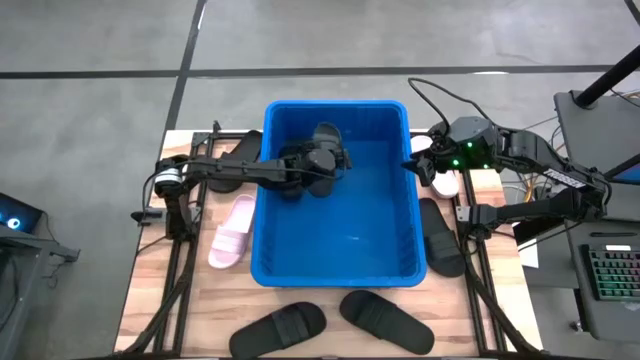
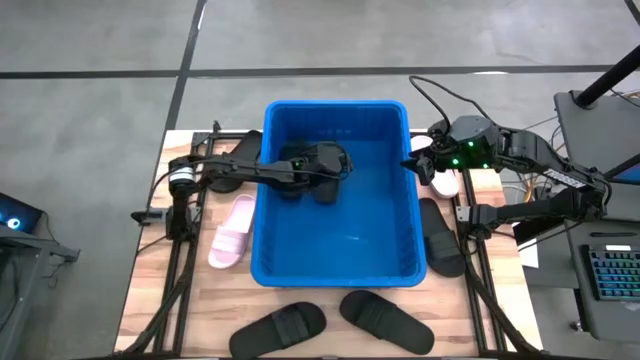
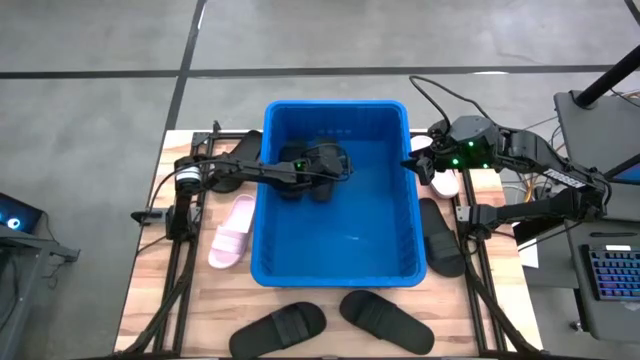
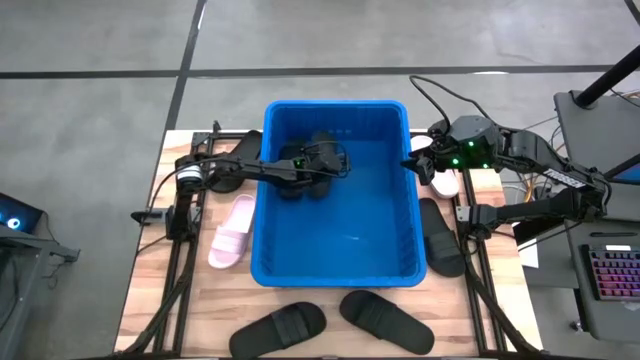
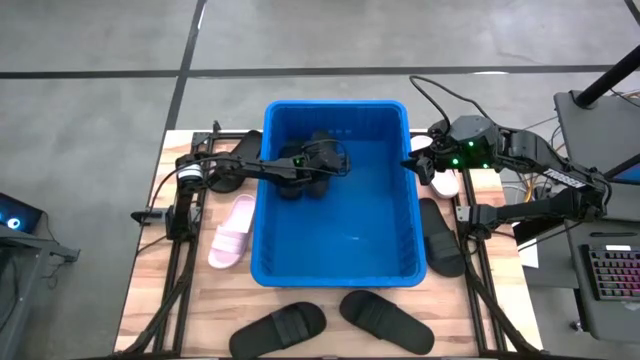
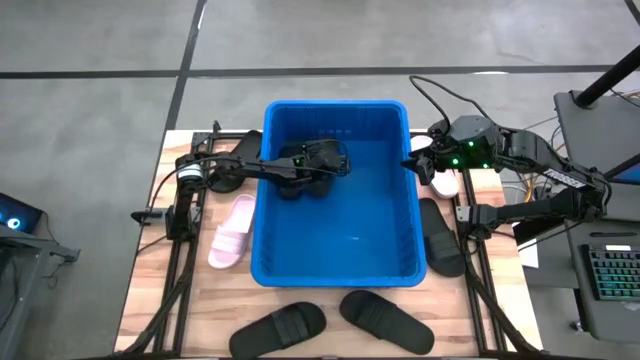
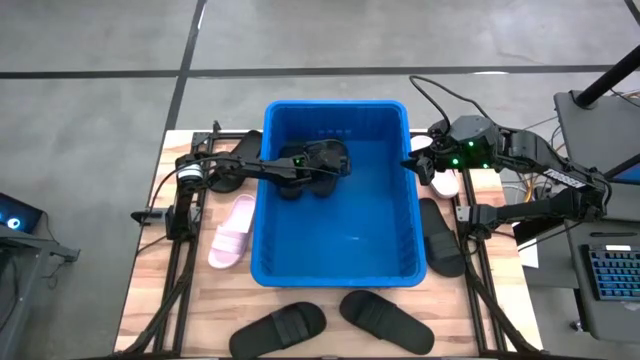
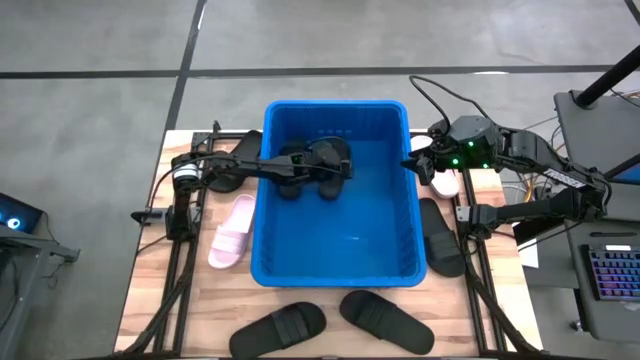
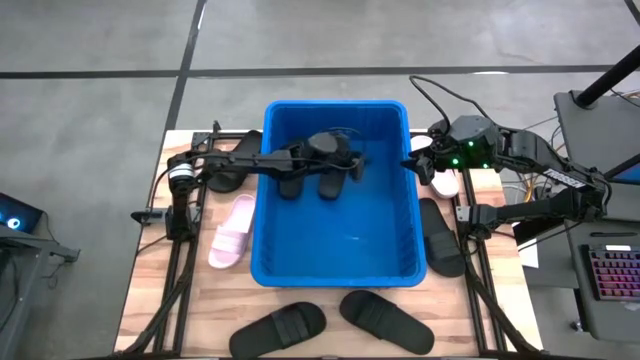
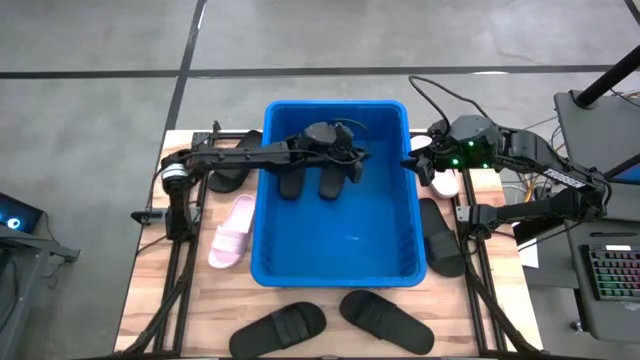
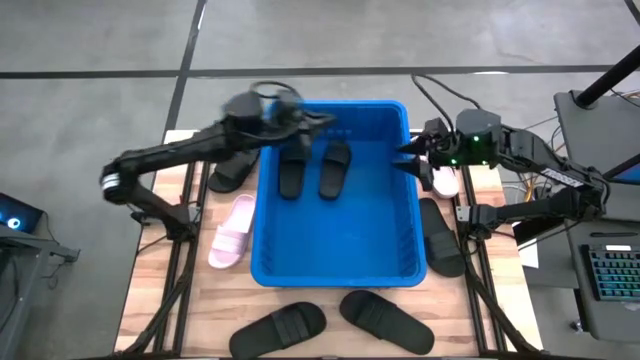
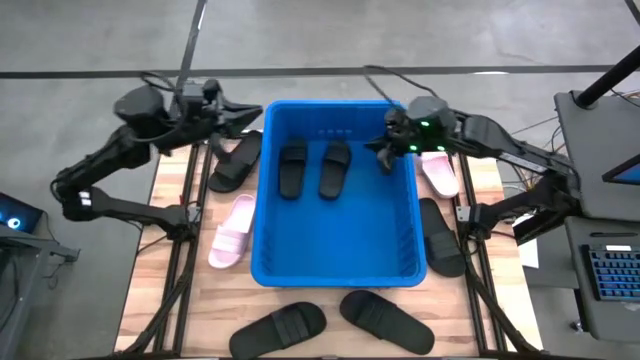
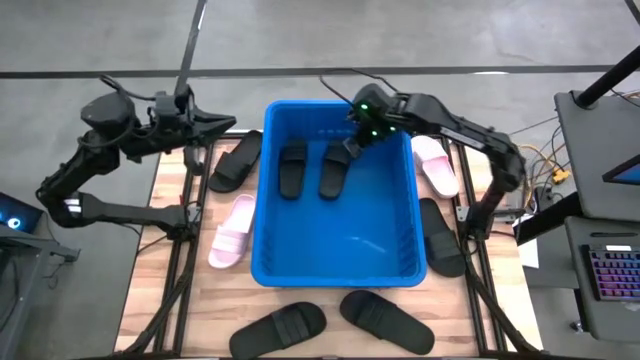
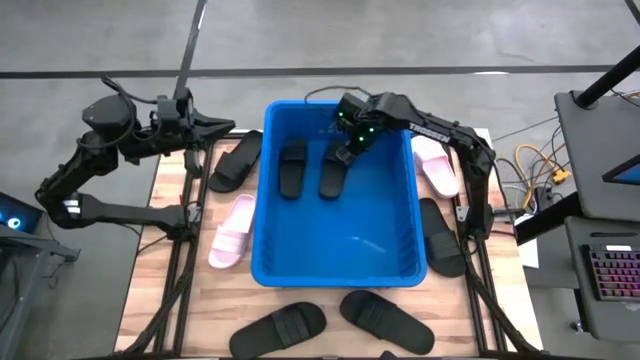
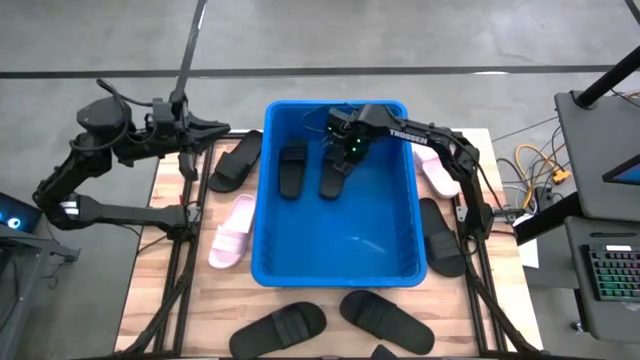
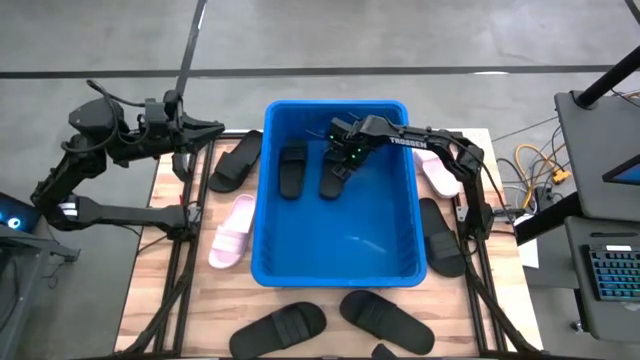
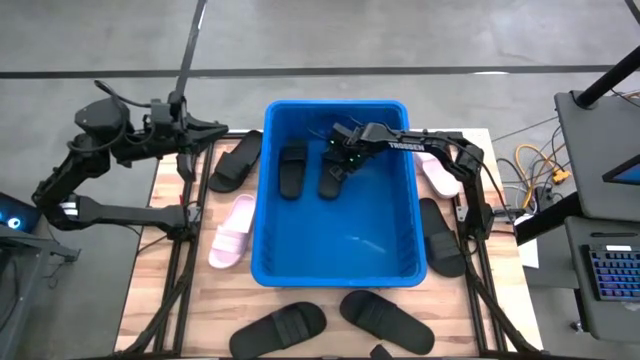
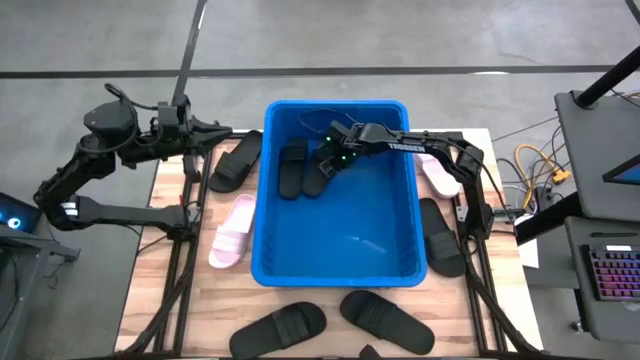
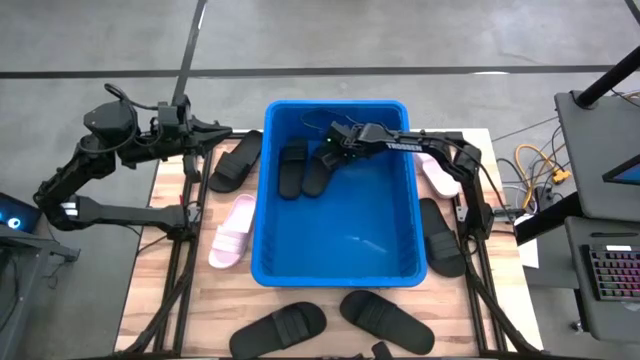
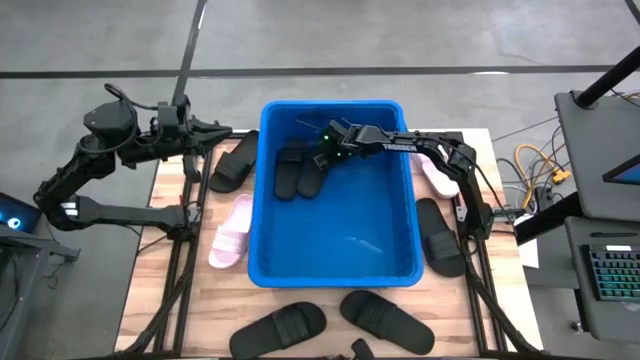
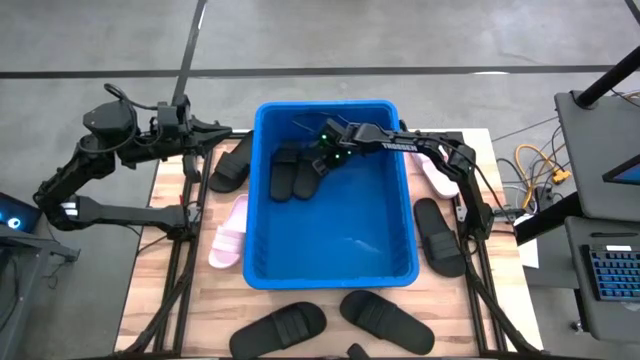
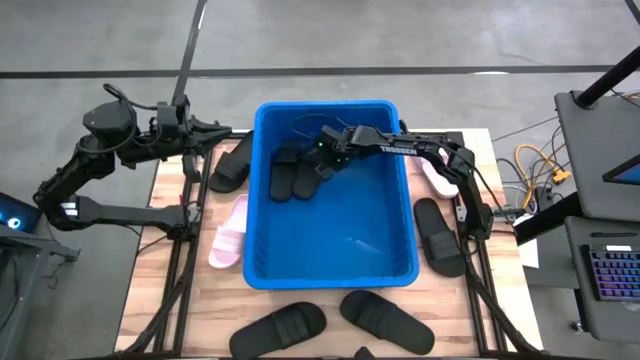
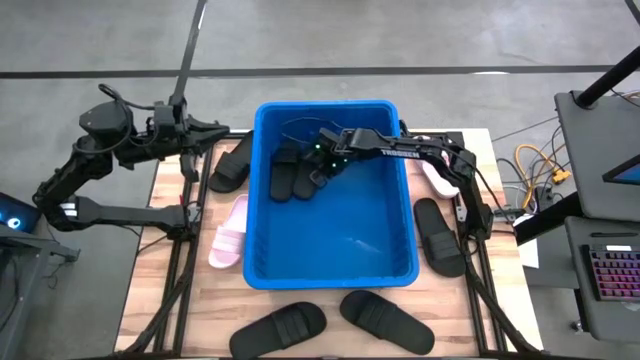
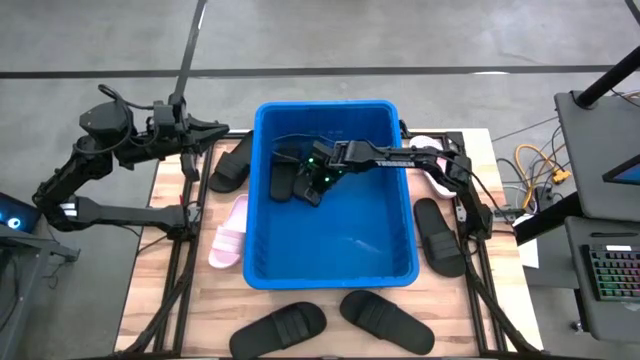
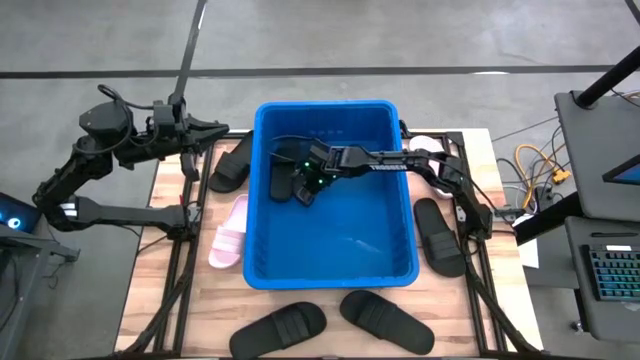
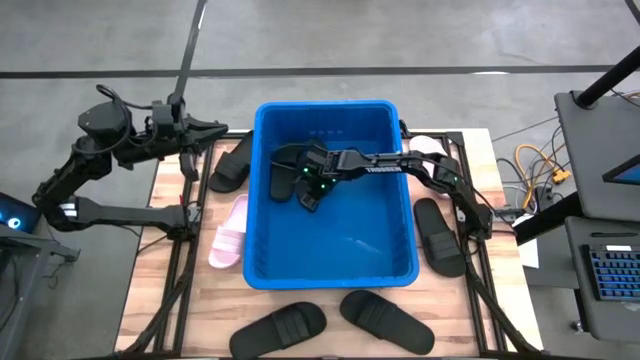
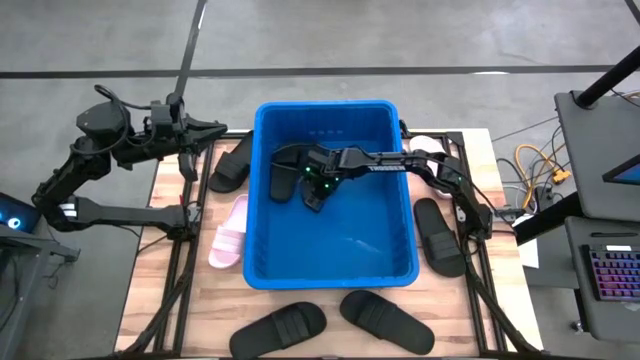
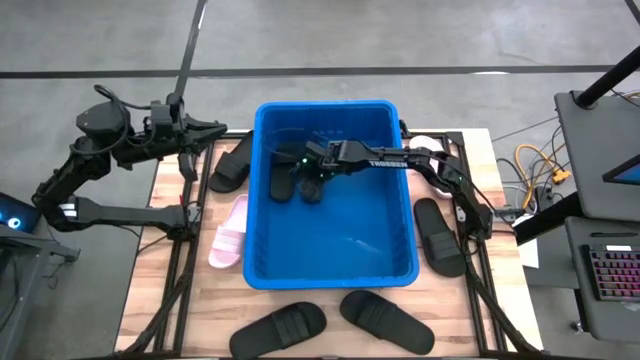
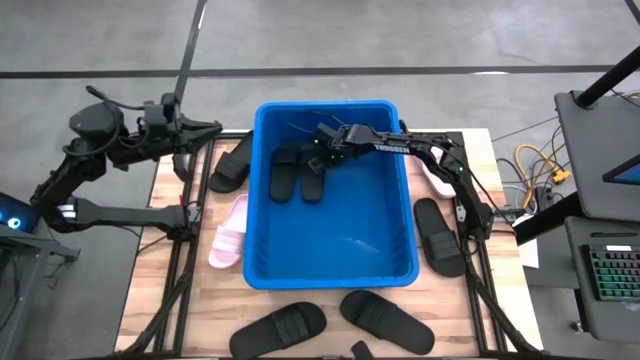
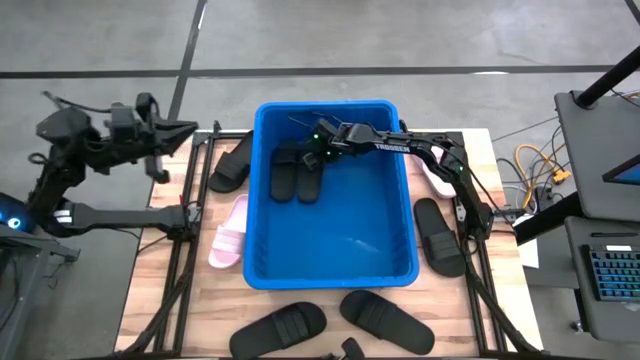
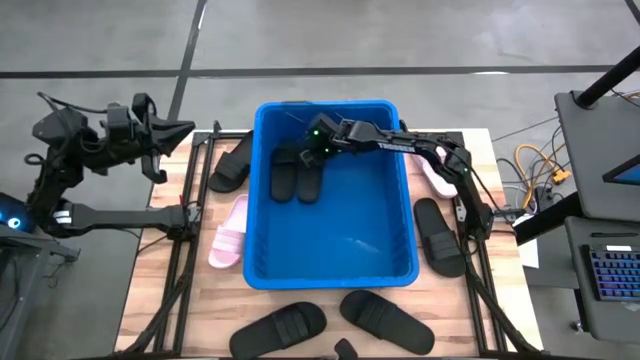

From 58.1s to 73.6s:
Task: Pick and place slides into bin
Put the black slide into the blue bin

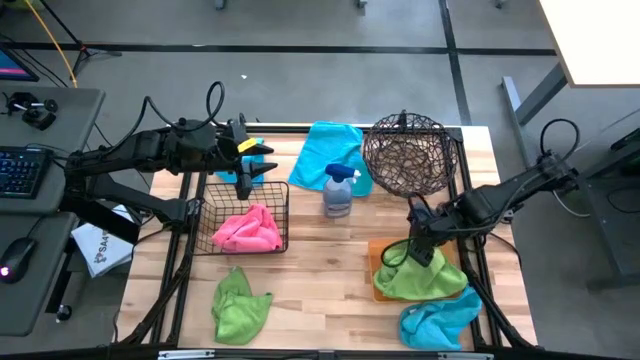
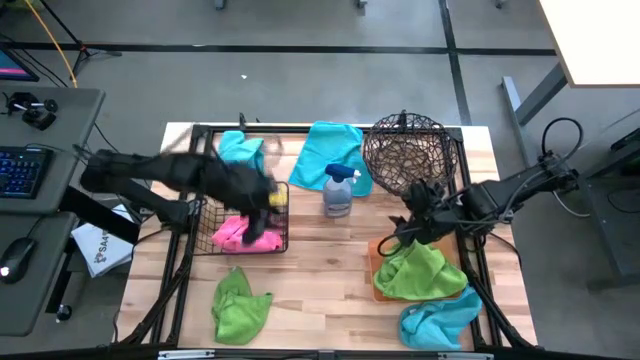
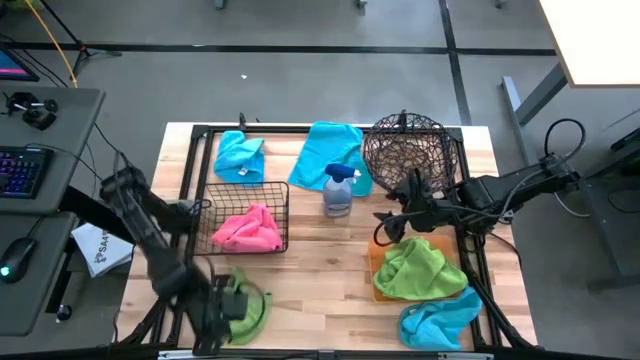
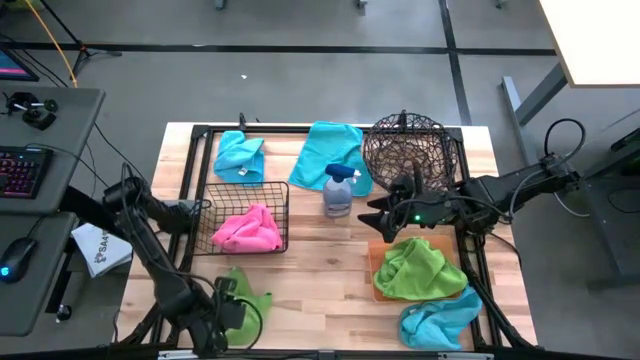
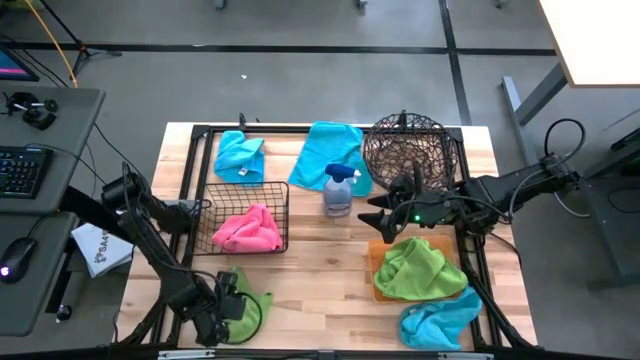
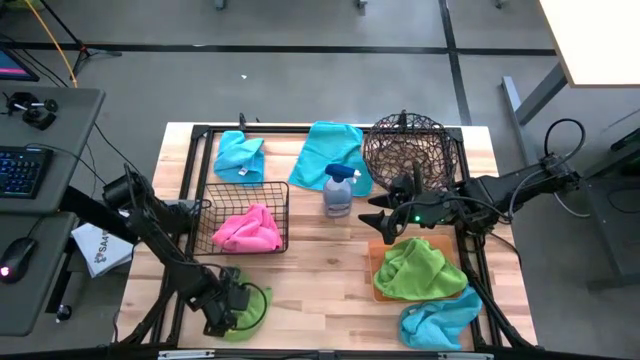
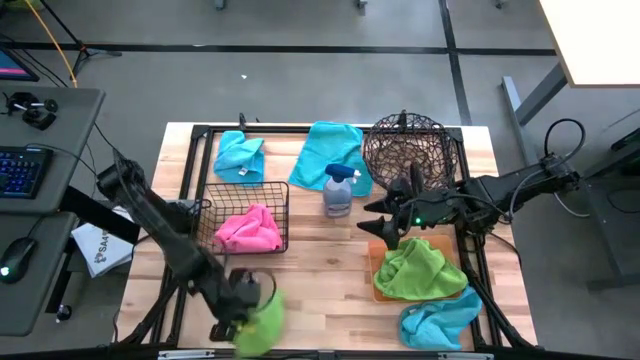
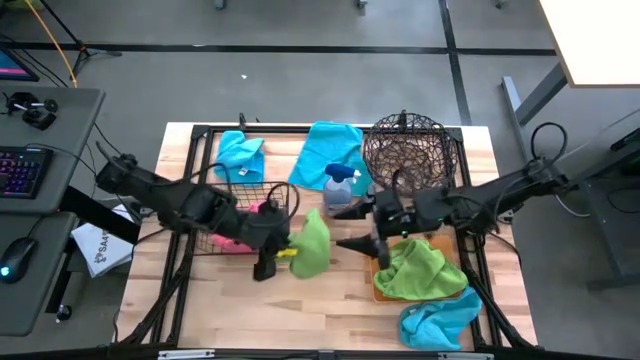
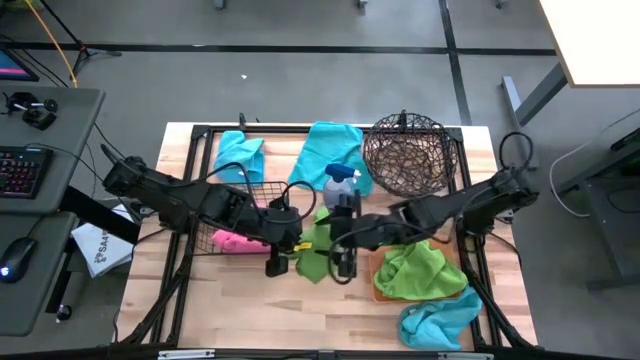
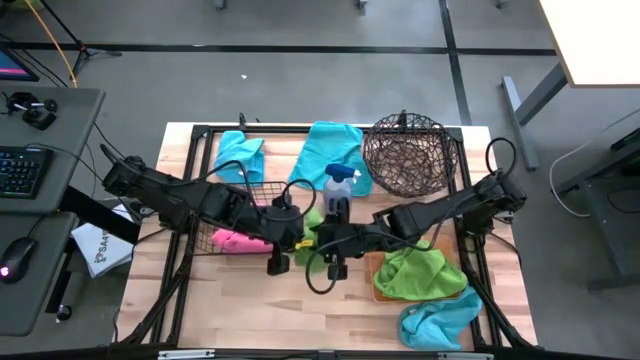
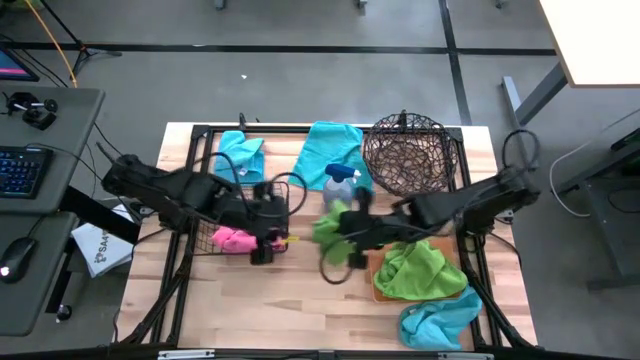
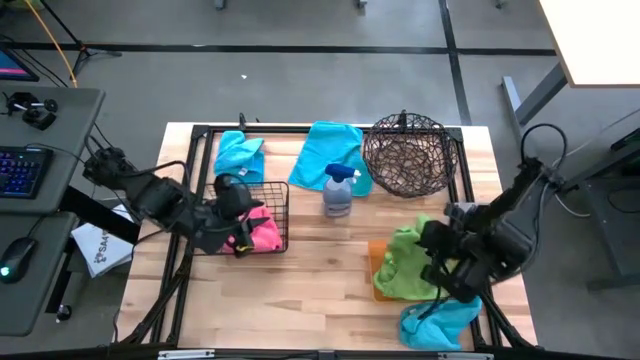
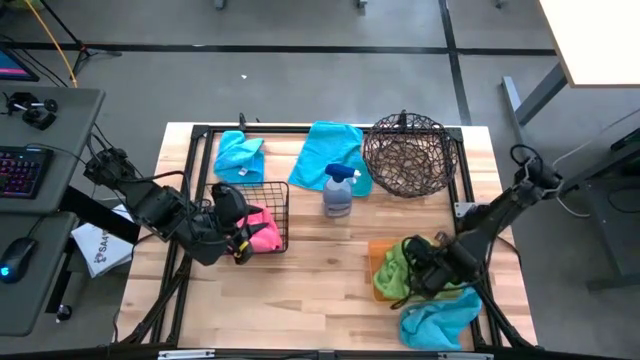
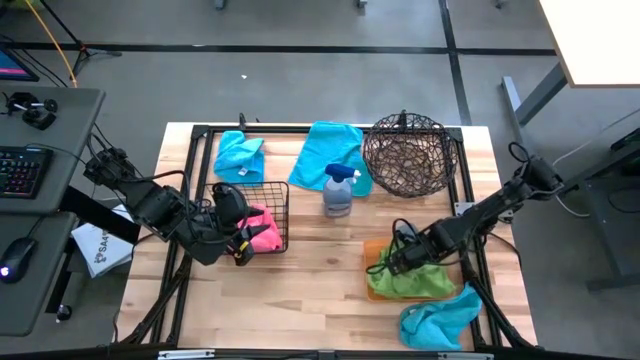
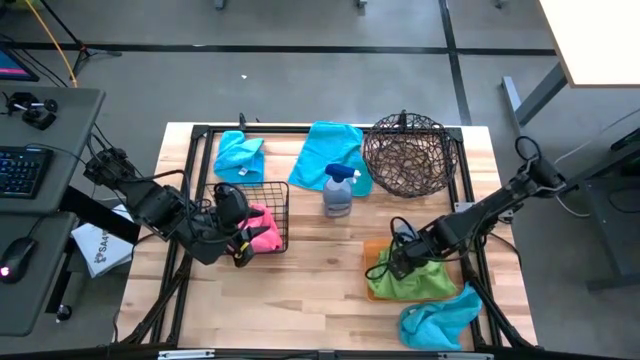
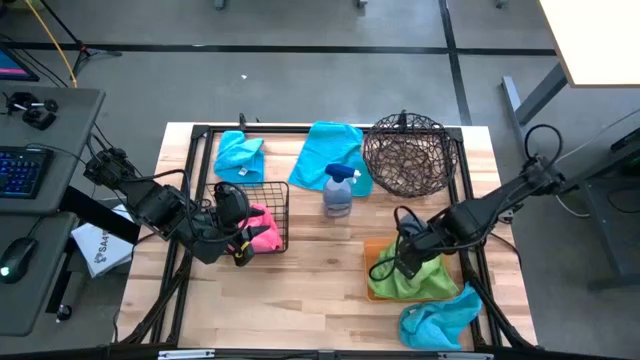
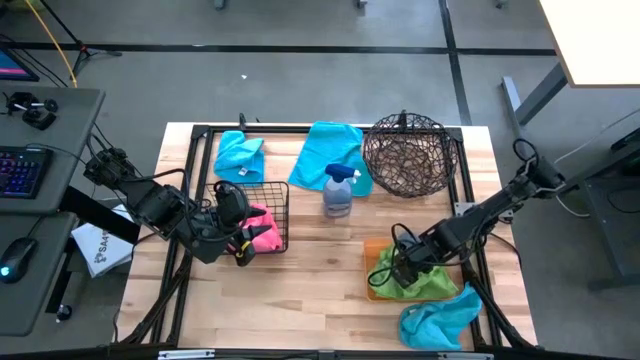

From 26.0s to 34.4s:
Task: Sort microfiber towel by color & place in baskets
Put the green microfiber cloth into the orange bin
